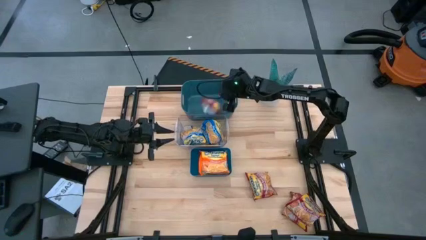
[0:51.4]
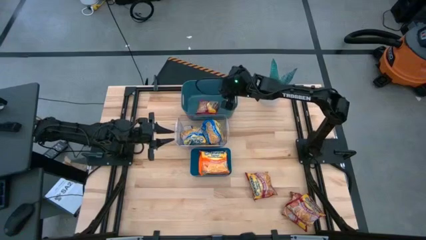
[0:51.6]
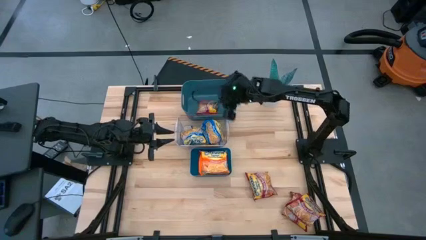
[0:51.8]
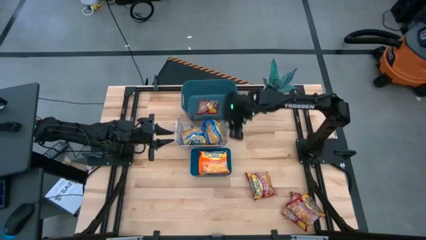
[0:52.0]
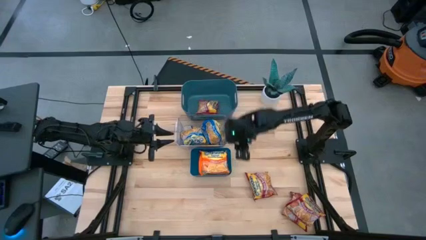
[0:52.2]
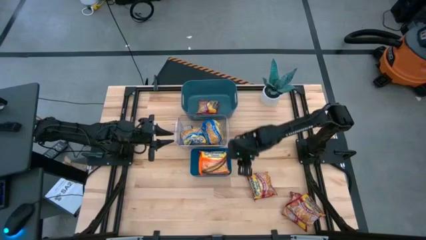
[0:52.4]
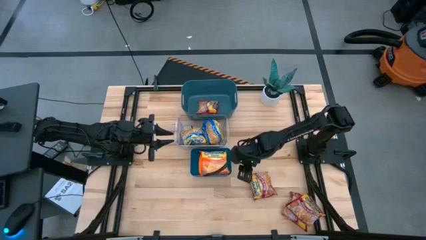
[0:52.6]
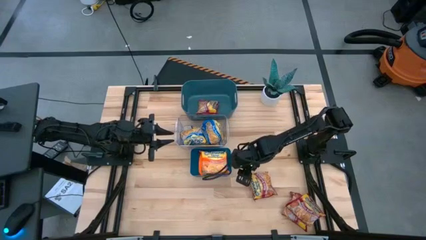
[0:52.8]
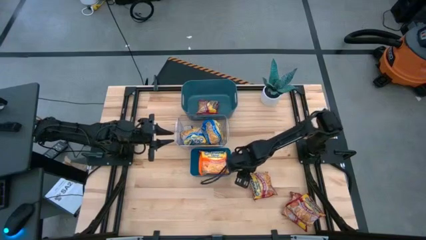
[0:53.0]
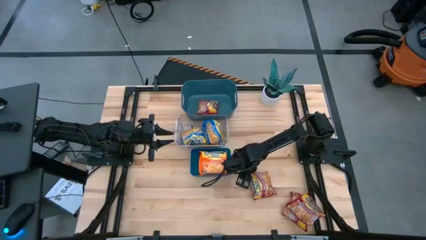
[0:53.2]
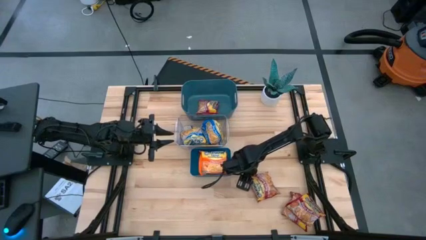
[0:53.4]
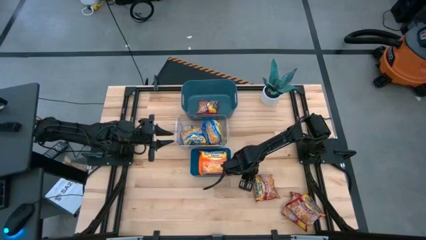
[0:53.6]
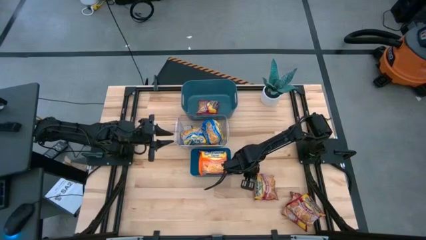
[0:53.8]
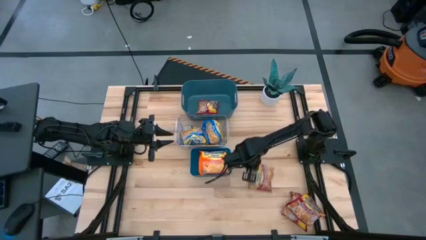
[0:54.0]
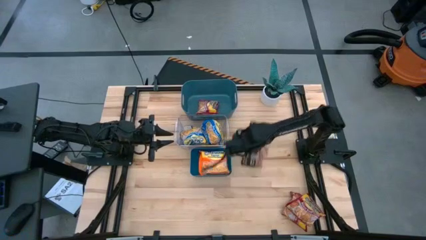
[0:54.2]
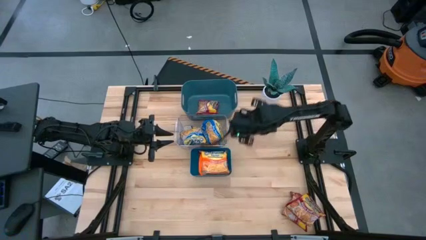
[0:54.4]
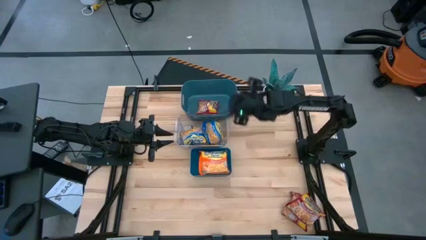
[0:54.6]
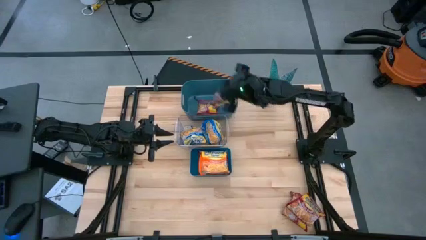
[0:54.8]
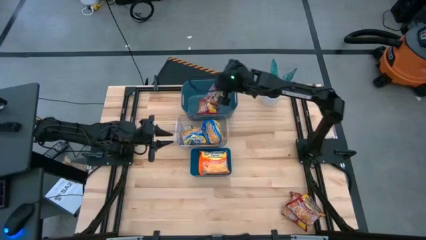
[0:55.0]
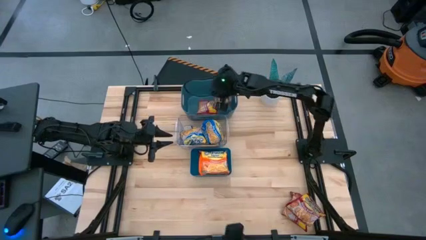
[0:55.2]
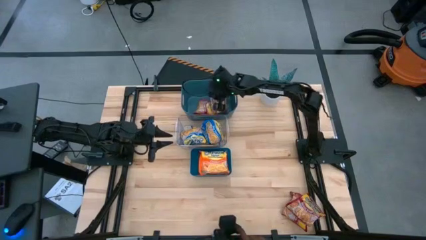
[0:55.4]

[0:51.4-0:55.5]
Task: Sort Maruchan noodles
Put the red noodle pack into the top blue bin

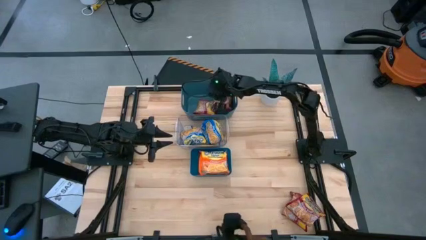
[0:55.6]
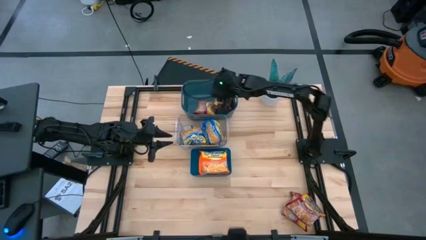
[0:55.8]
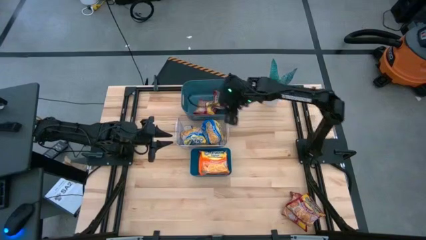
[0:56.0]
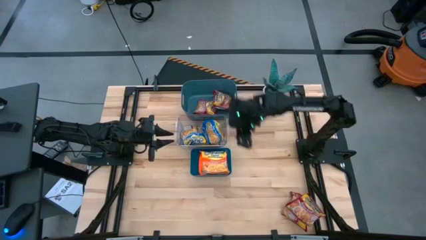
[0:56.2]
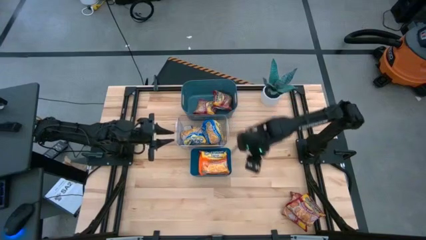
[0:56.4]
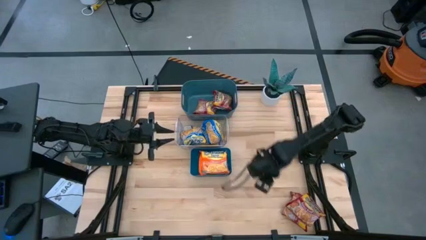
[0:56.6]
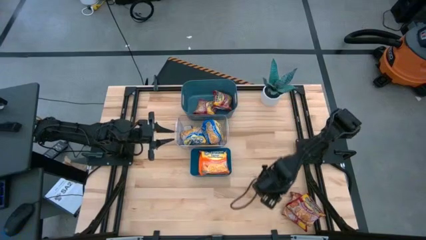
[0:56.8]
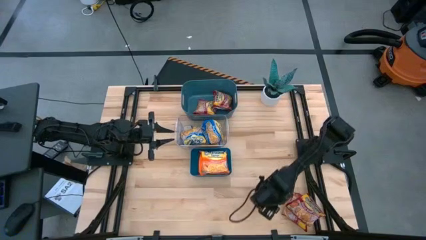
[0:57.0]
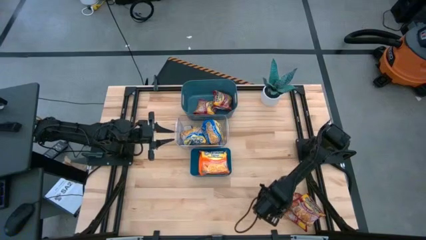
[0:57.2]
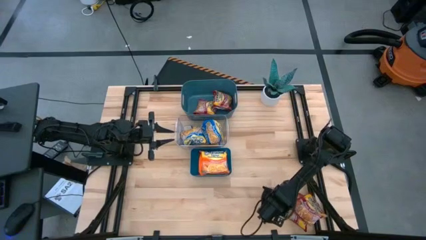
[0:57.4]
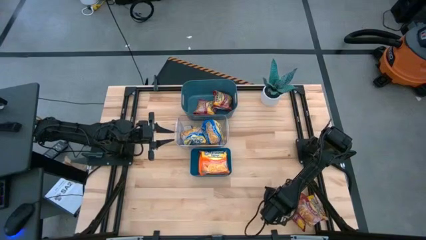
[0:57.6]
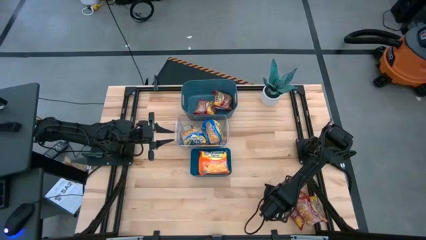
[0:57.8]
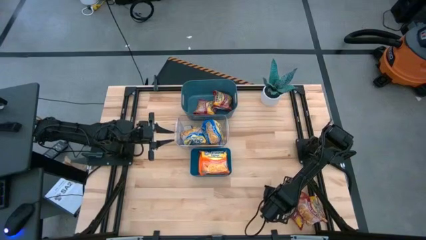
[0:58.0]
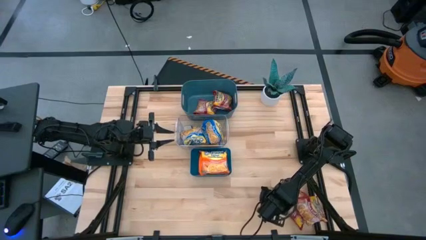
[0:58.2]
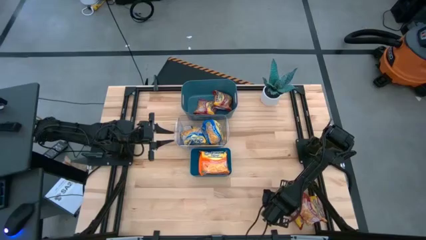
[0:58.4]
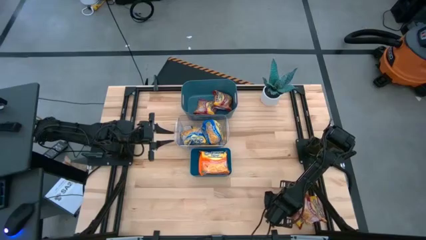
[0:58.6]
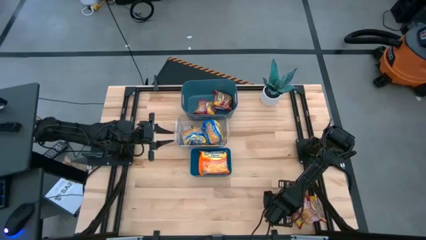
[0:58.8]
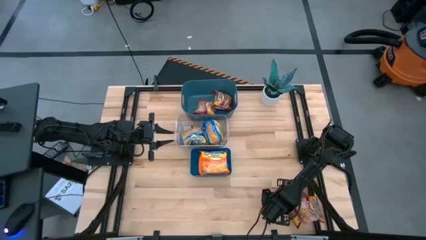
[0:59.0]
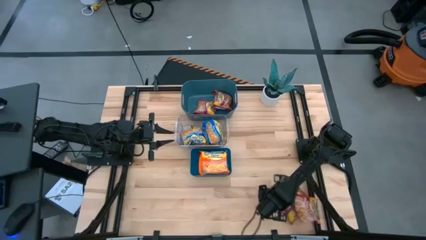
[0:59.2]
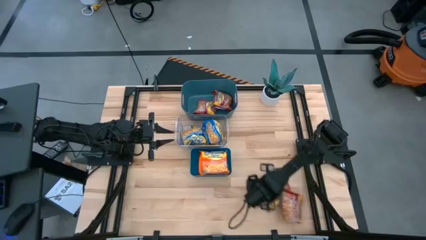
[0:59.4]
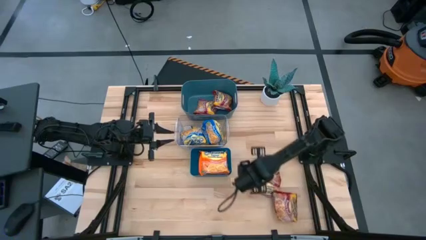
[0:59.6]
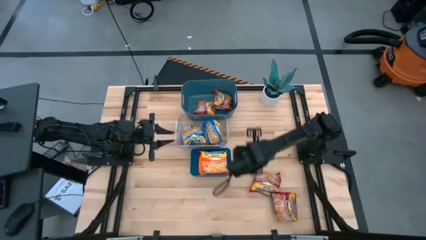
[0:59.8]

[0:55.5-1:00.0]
Put the red noodle pack into the top blue bin

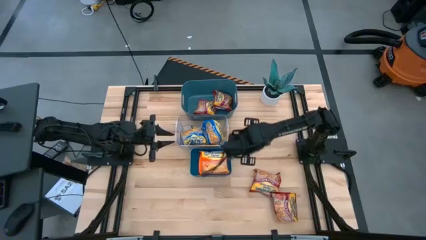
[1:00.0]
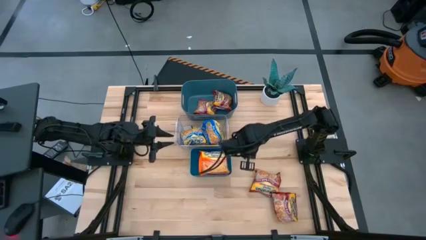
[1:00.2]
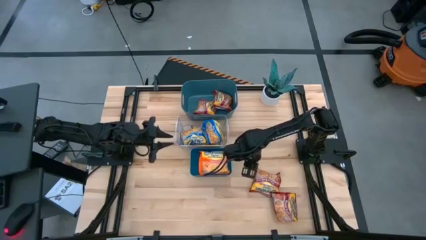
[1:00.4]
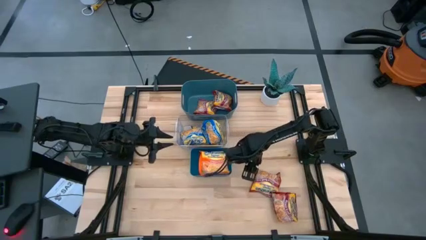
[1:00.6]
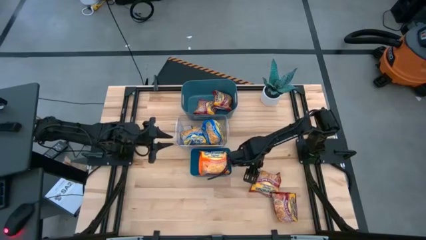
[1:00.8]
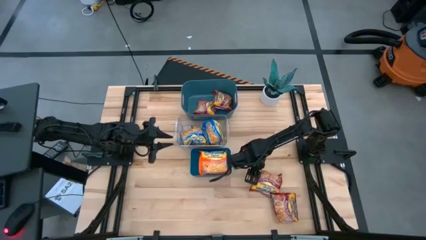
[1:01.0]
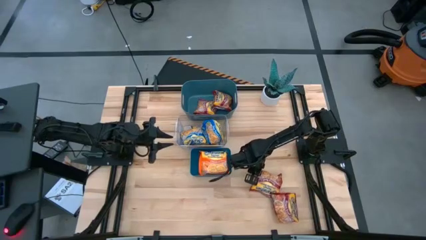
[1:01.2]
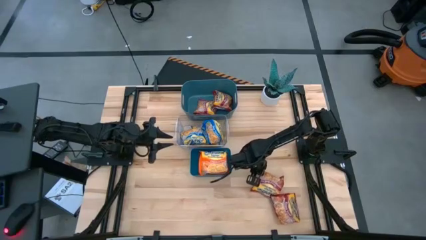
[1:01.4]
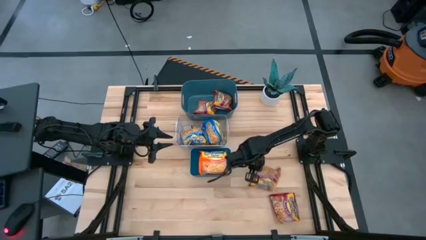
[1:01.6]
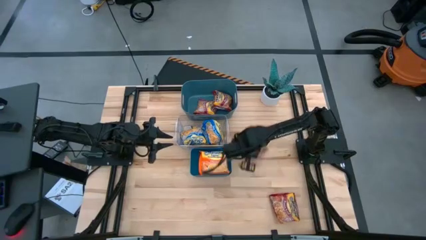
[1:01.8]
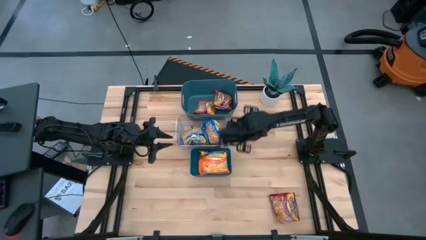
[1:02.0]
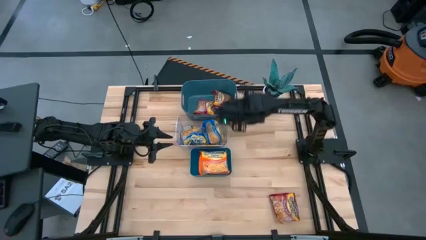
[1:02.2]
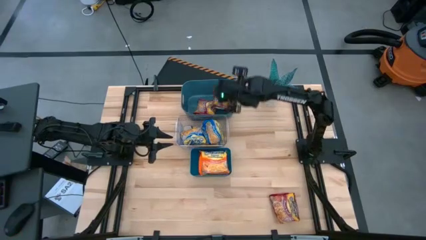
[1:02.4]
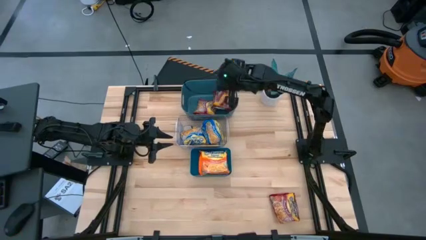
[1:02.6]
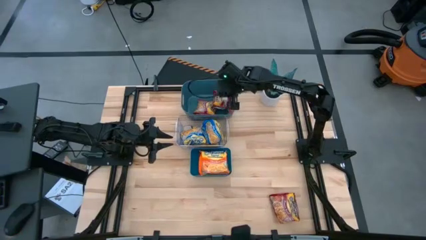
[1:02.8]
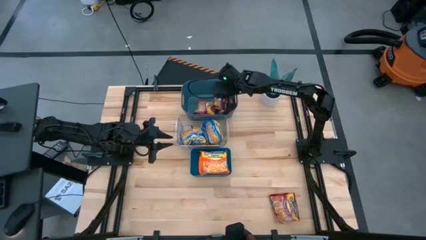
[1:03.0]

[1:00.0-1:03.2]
Put the red noodle pack into the top blue bin

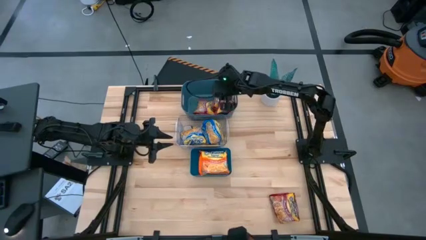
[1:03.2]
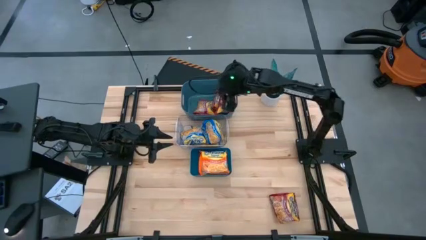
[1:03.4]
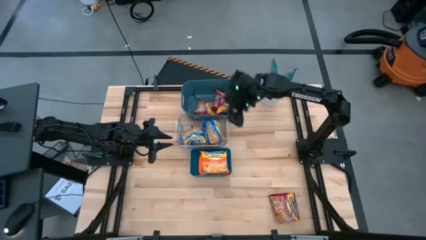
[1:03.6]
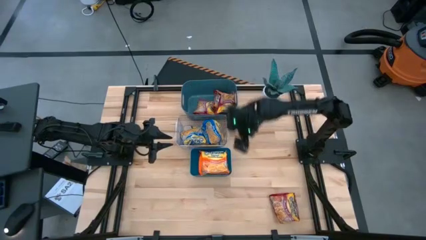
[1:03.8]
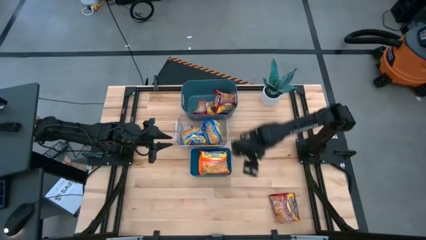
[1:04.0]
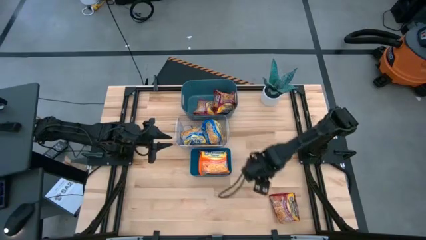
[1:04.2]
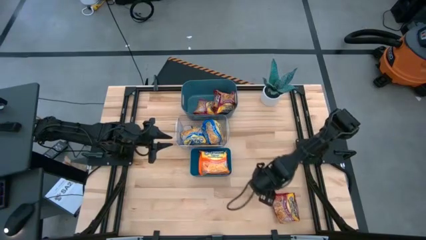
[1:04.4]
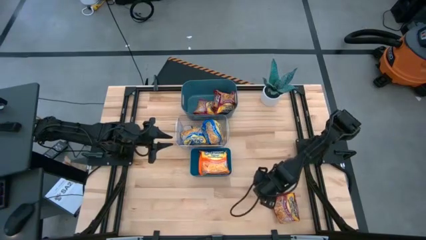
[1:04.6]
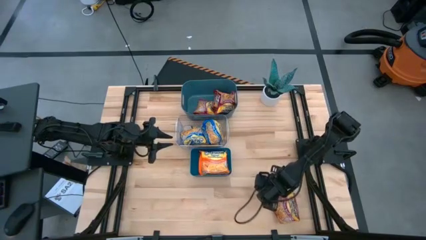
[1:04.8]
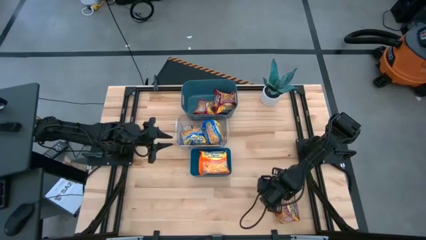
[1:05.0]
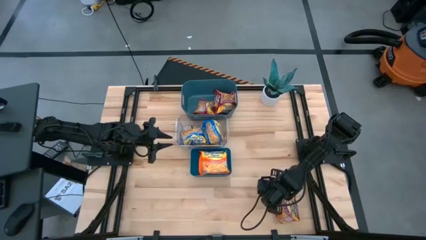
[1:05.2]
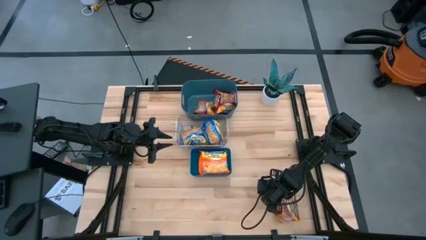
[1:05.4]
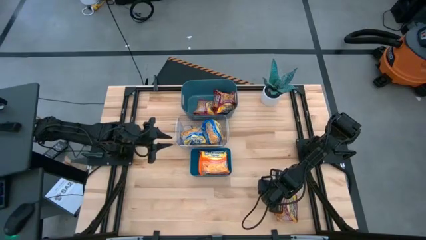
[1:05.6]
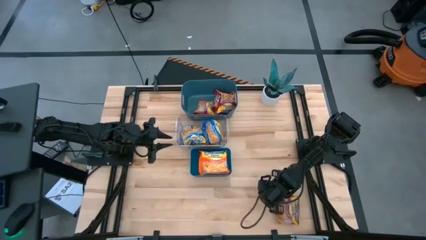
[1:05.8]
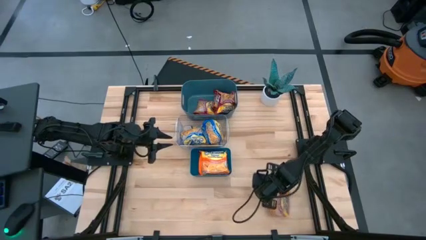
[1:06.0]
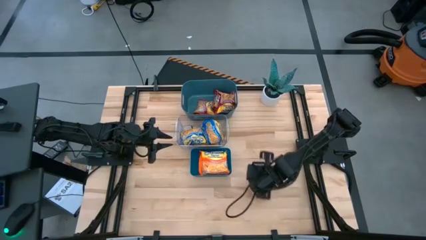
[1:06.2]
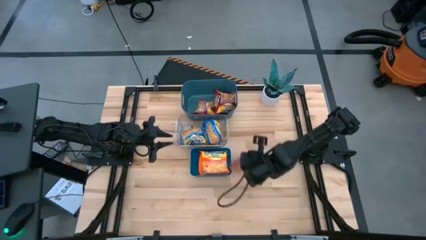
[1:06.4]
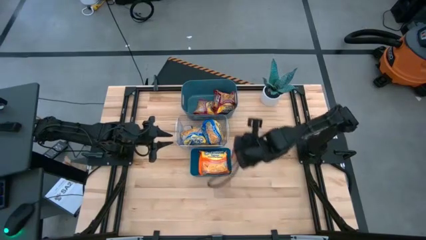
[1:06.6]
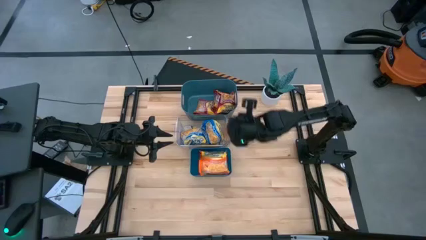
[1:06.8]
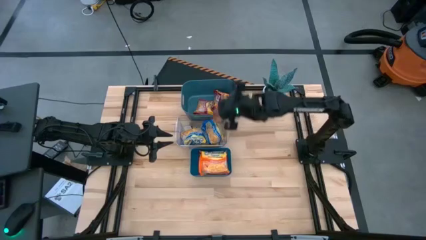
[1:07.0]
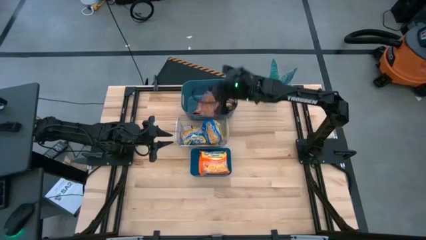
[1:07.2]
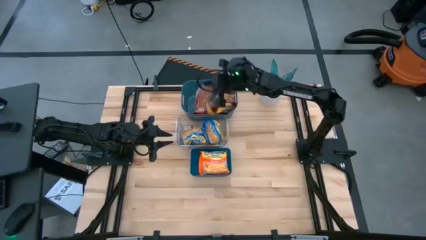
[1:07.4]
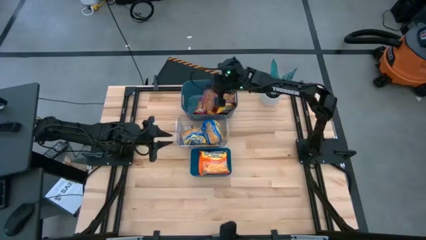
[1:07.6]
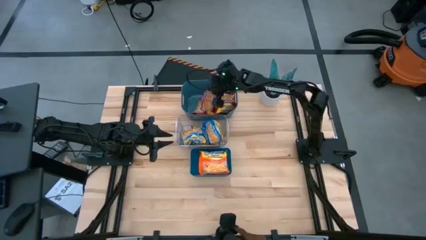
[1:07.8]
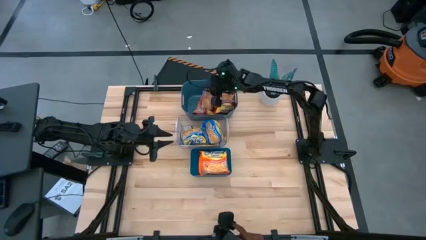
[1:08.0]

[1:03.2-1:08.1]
Put the red noodle pack into the top blue bin
